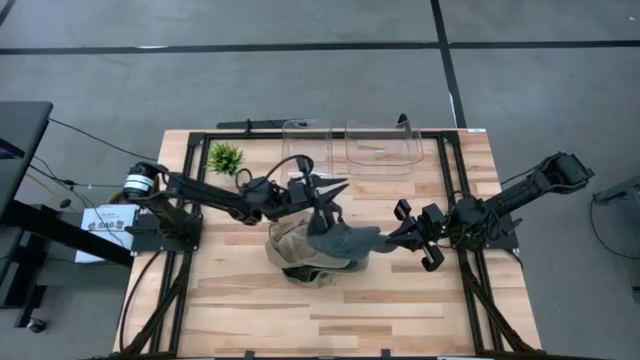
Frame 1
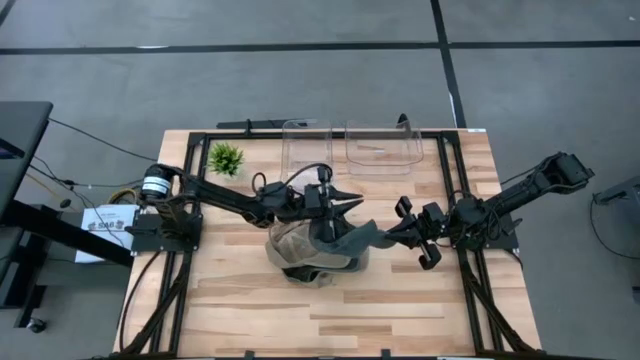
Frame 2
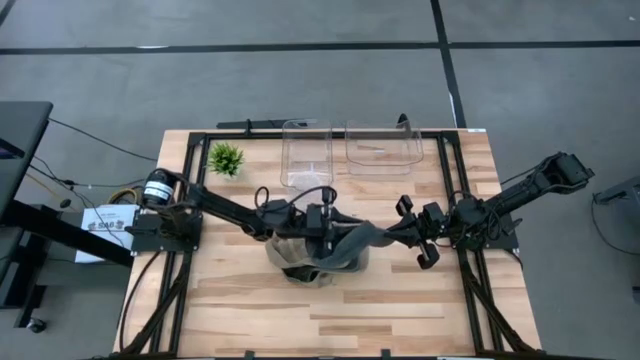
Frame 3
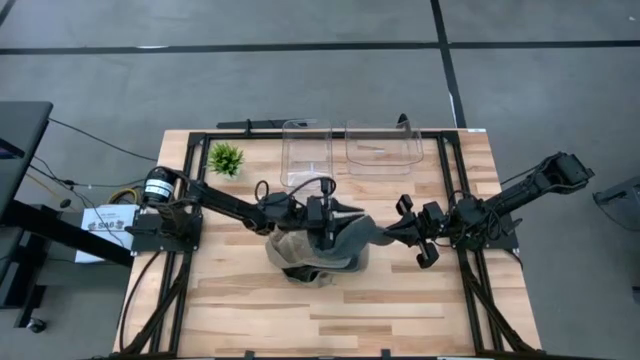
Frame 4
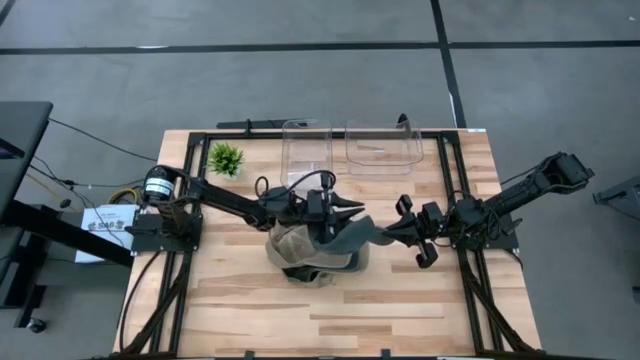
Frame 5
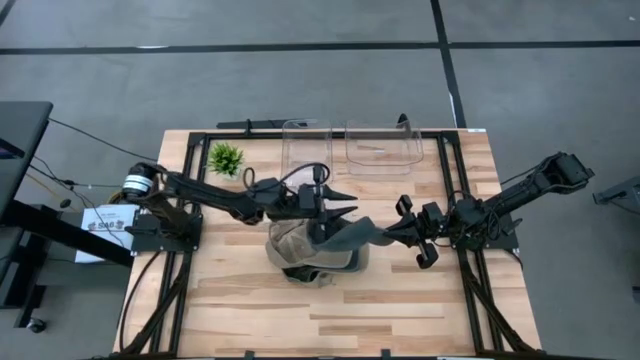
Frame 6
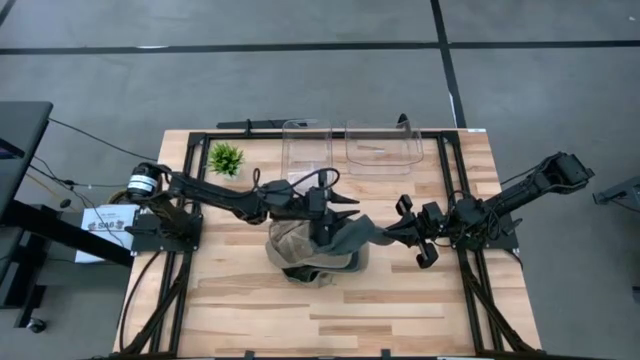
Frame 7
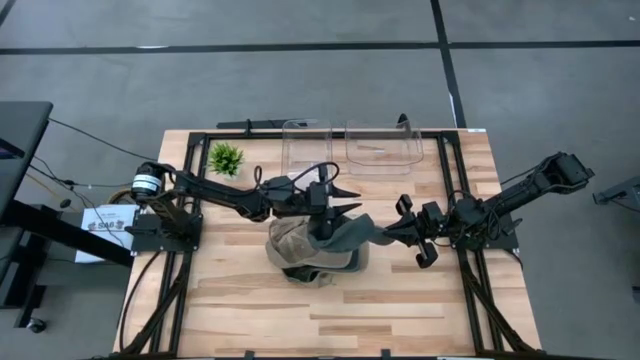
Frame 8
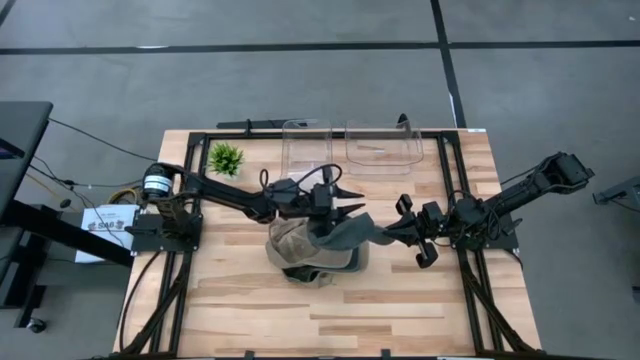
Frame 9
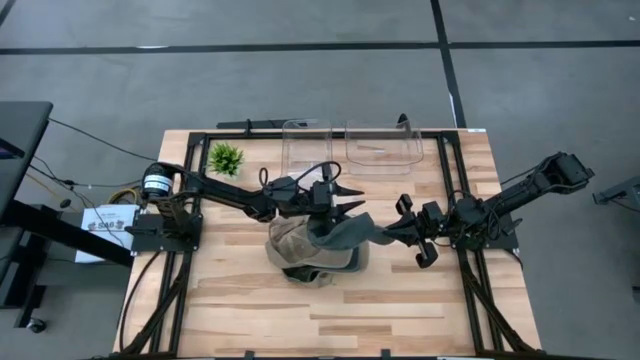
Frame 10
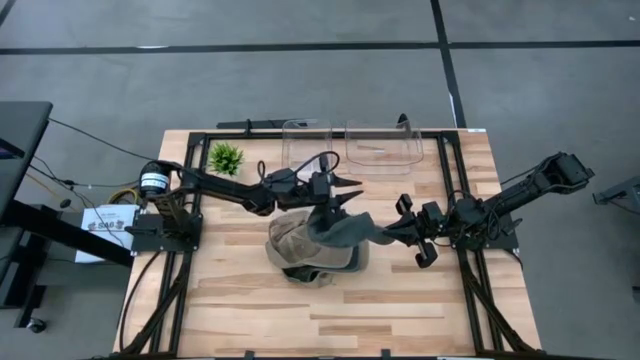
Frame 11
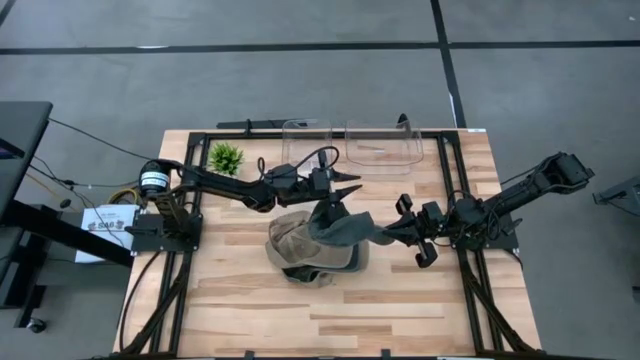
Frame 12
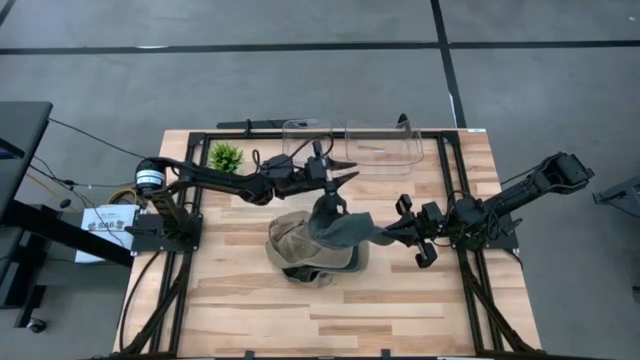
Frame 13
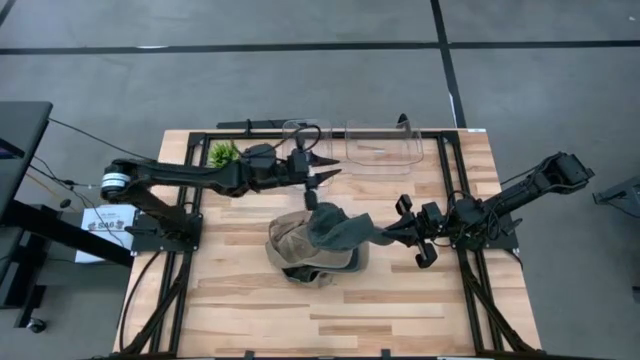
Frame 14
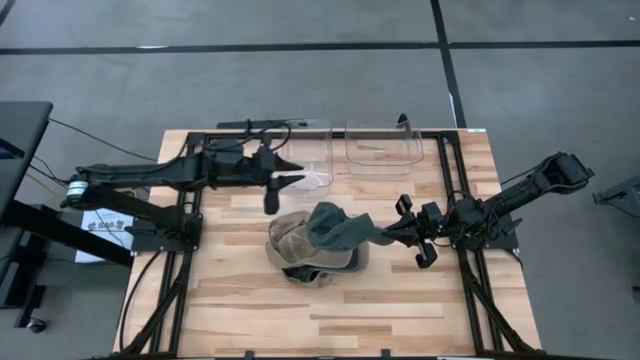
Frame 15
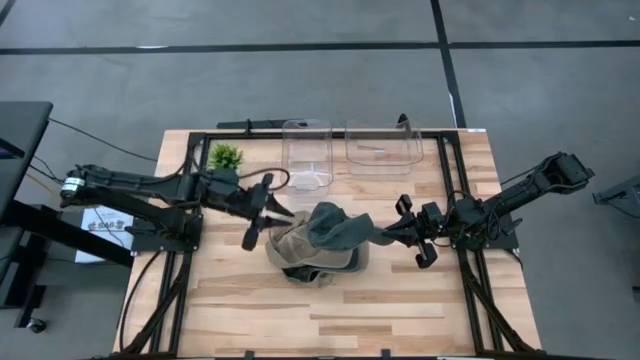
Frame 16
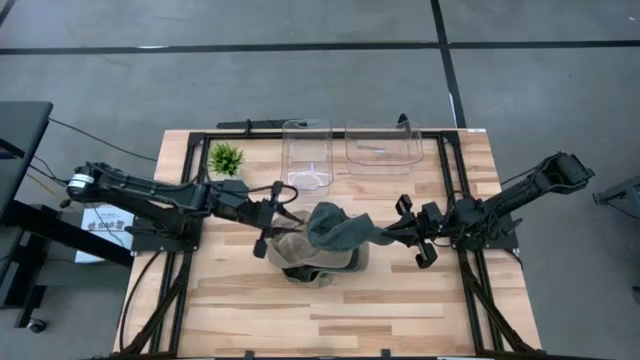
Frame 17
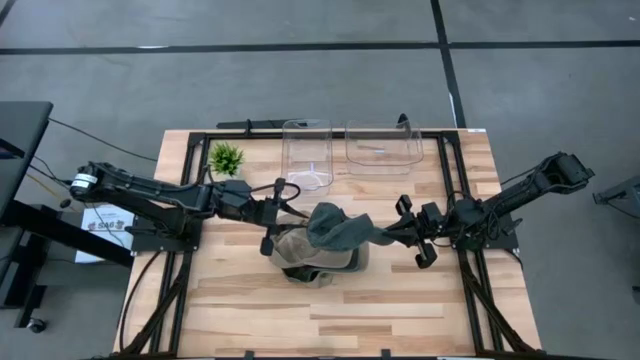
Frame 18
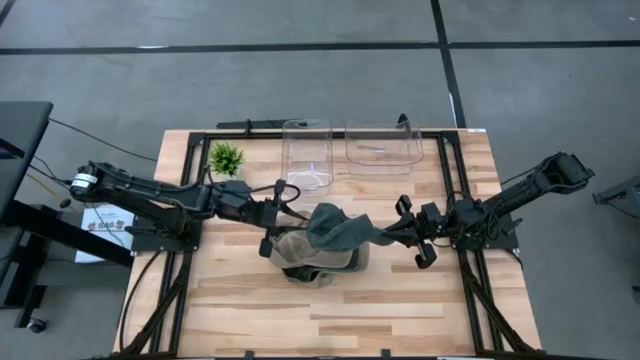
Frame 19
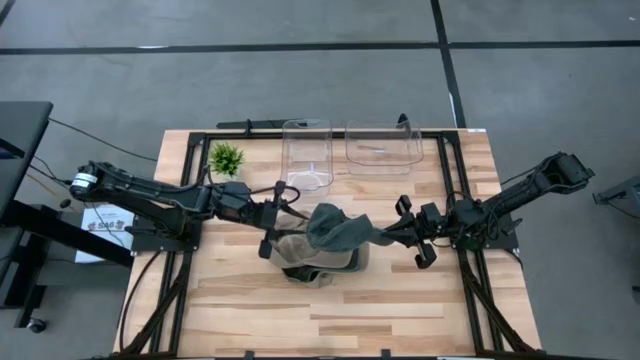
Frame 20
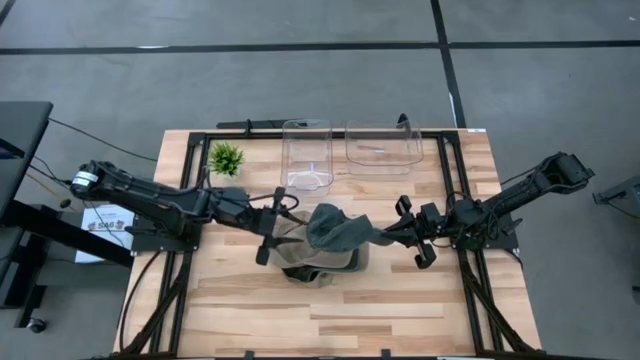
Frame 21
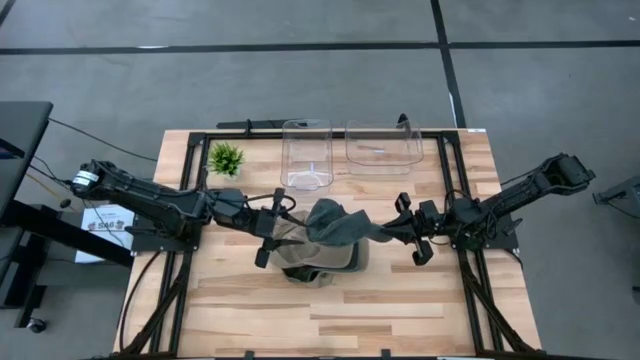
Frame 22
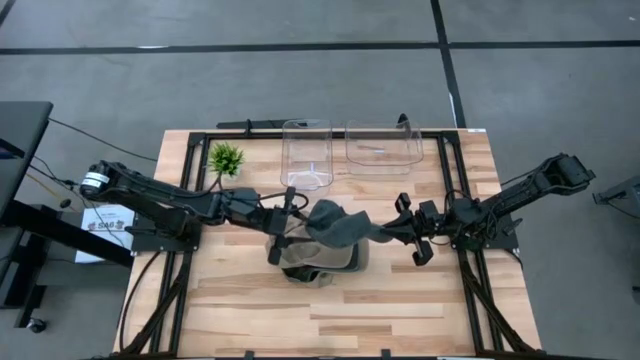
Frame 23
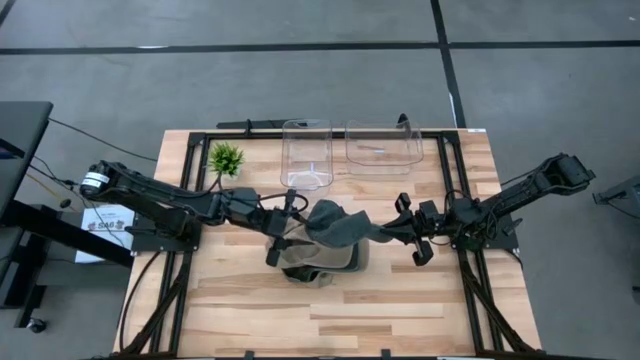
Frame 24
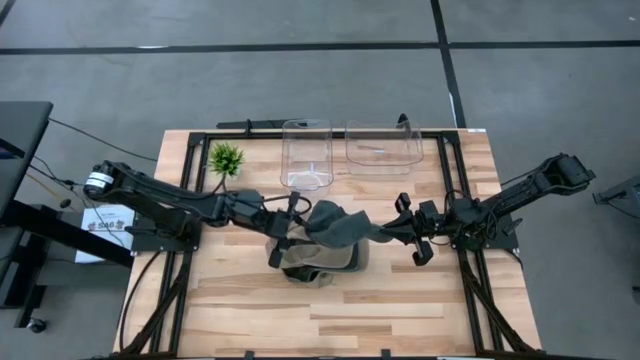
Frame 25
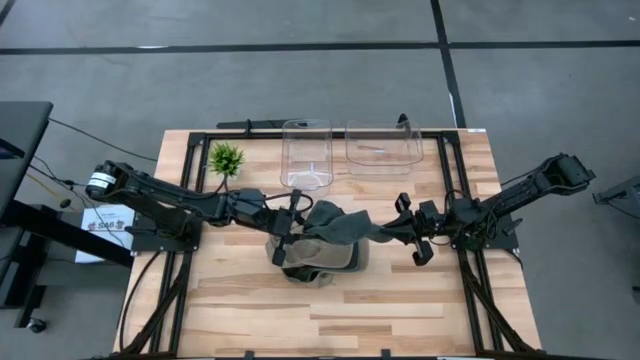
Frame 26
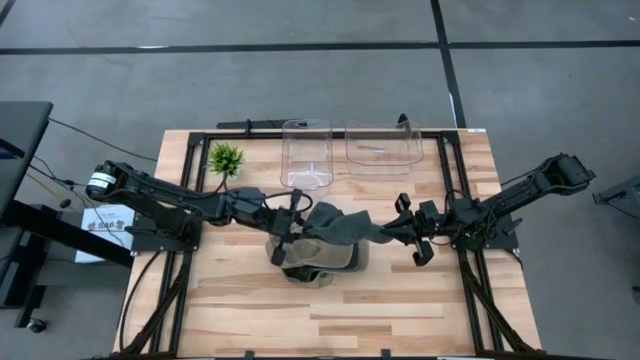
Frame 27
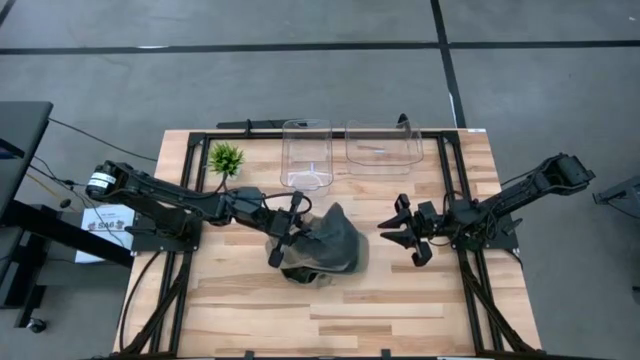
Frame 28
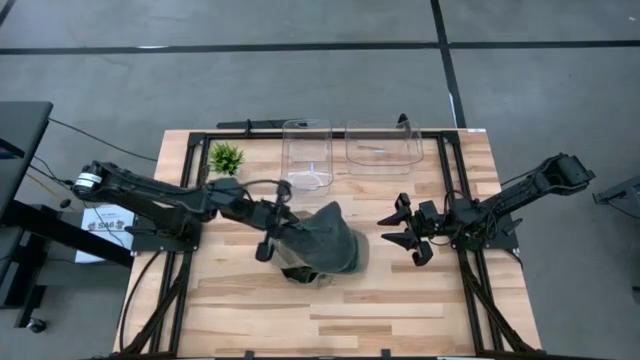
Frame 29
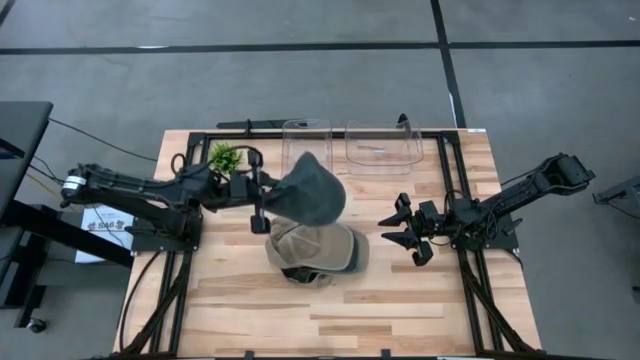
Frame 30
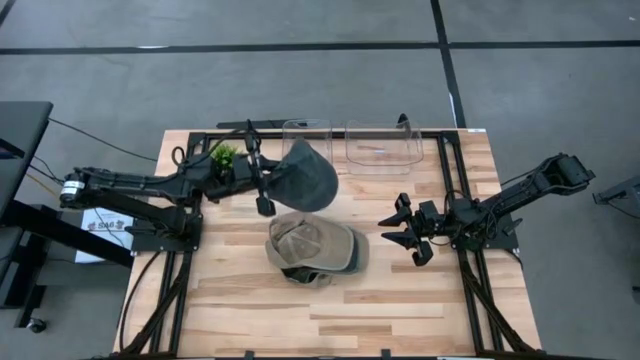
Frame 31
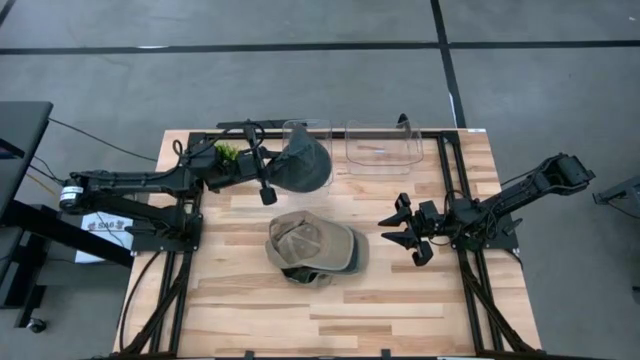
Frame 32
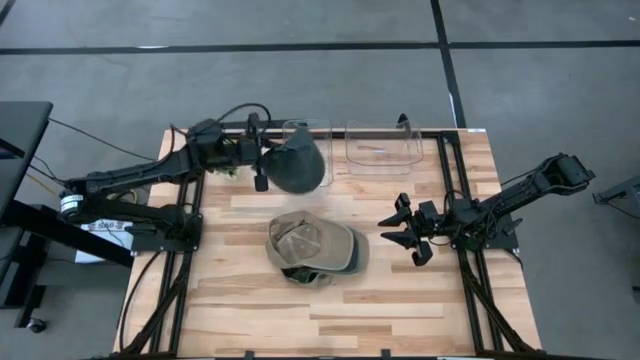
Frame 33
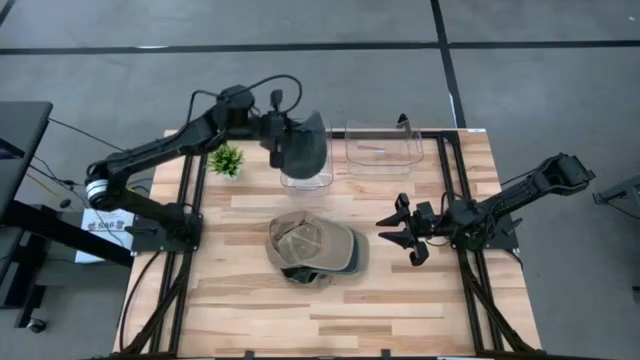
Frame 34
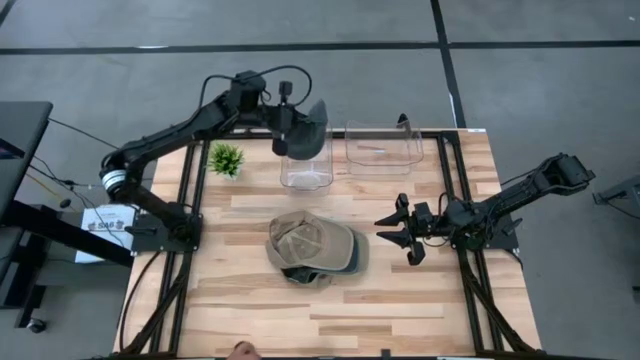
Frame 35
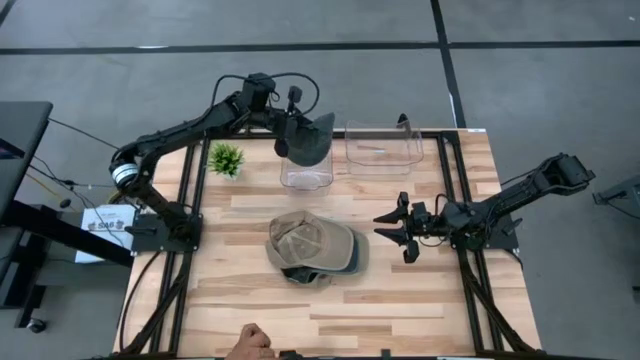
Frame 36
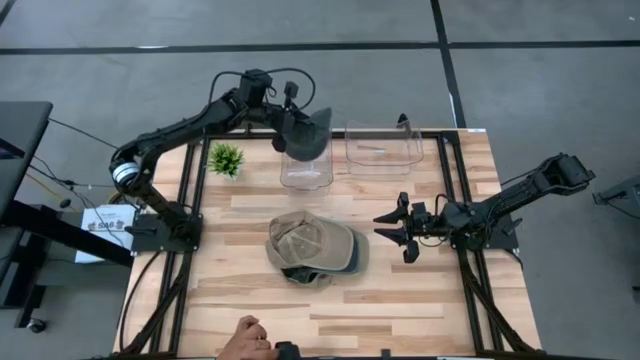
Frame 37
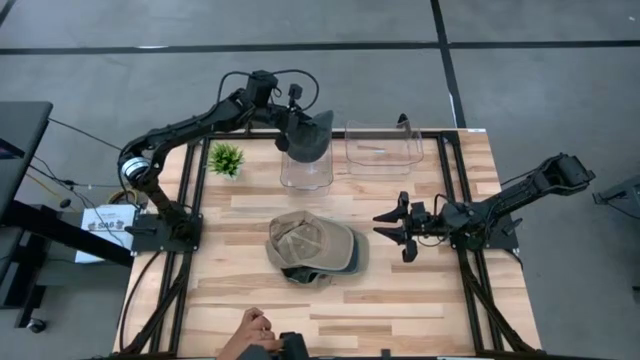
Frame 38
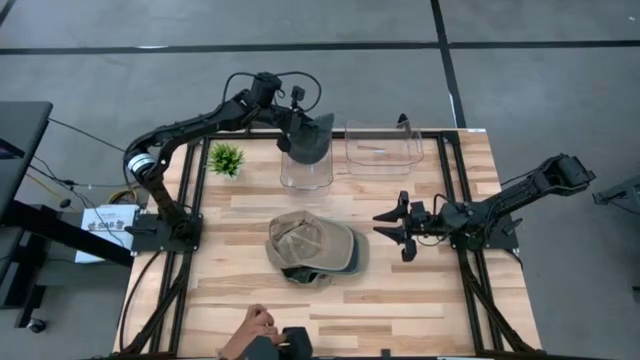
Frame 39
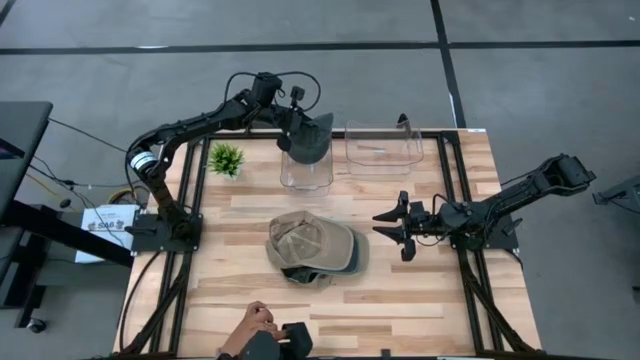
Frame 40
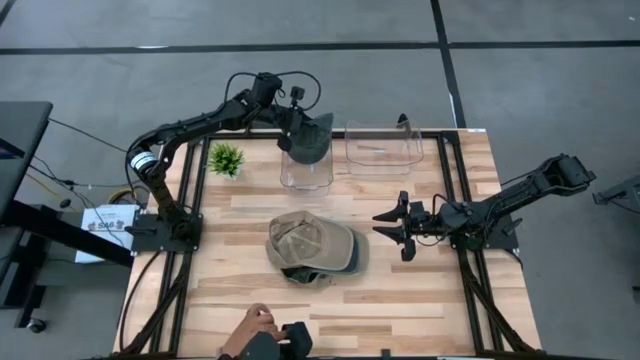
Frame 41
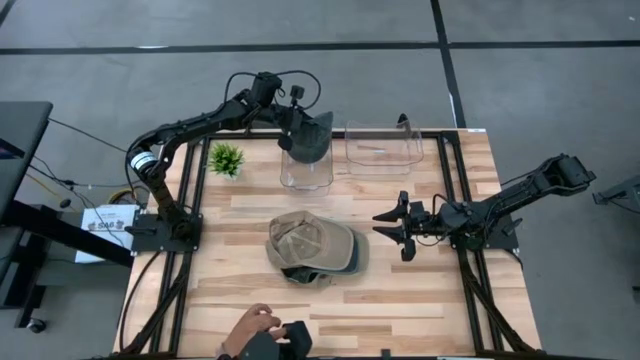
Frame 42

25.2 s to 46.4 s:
Task: Pick & Place hat
Put the black cap into the left transparent bin

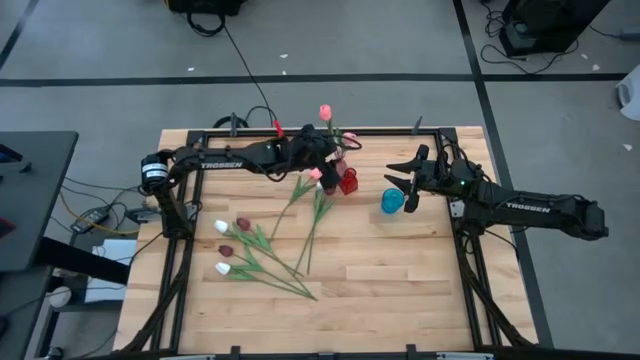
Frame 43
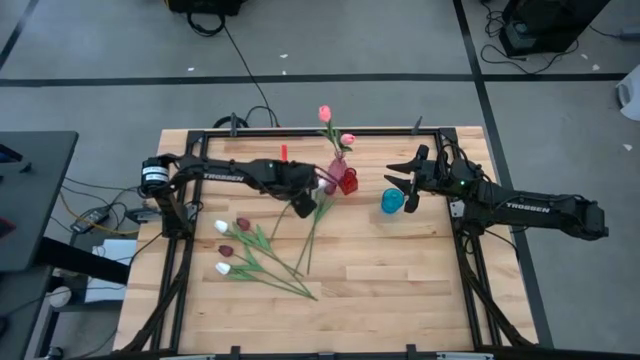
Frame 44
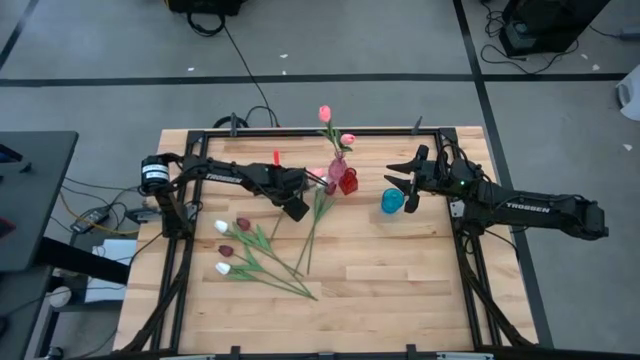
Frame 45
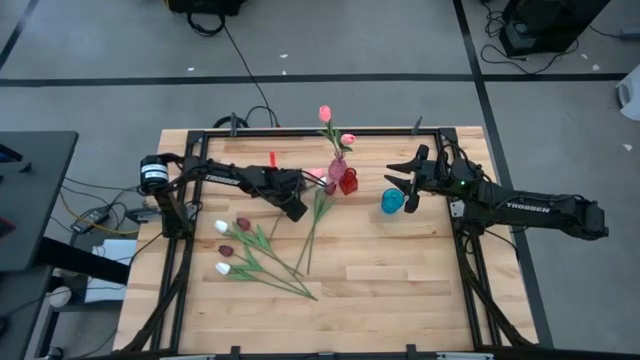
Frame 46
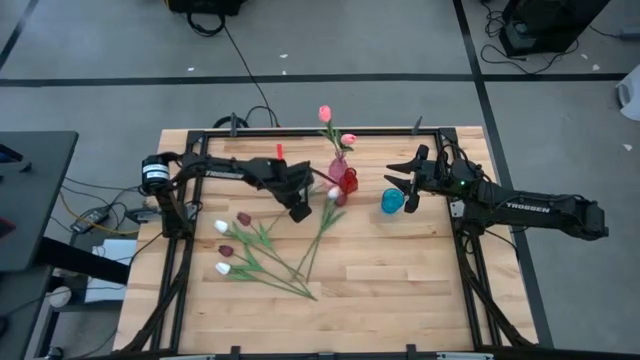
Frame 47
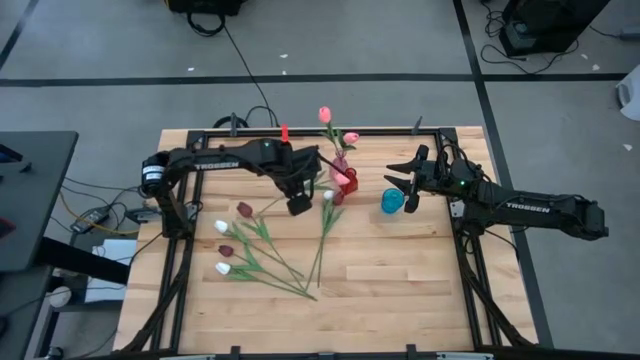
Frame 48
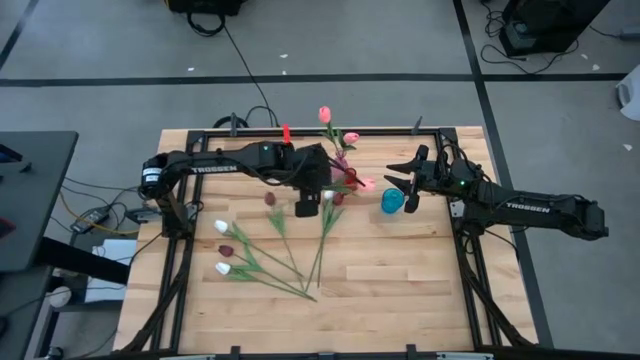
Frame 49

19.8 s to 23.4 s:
Task: Sort flowers into vase by color
Put the pink flower into the pink vase
